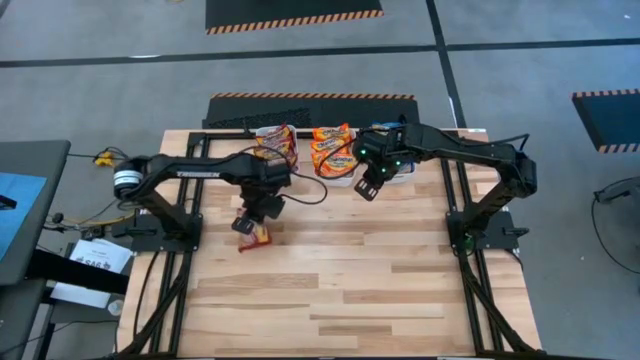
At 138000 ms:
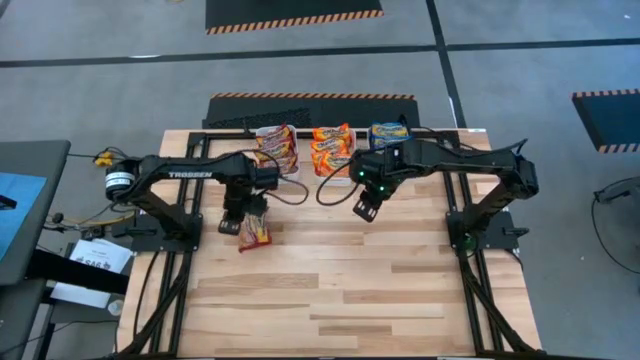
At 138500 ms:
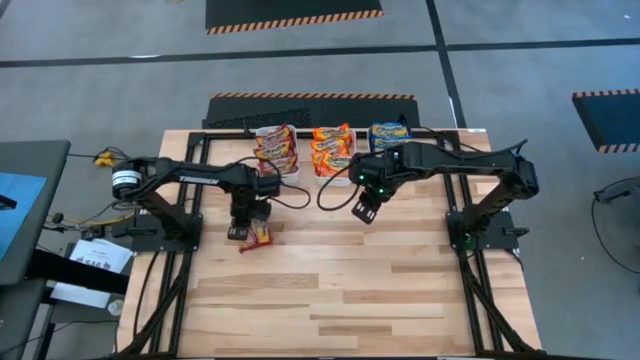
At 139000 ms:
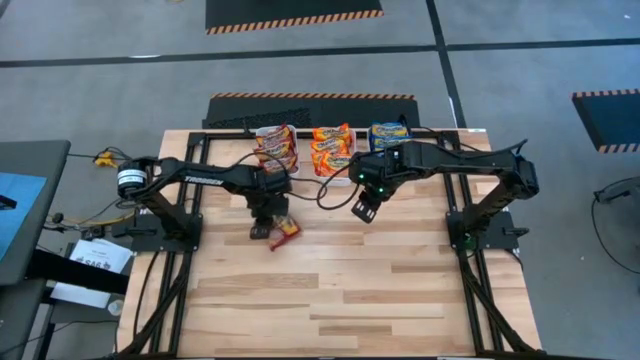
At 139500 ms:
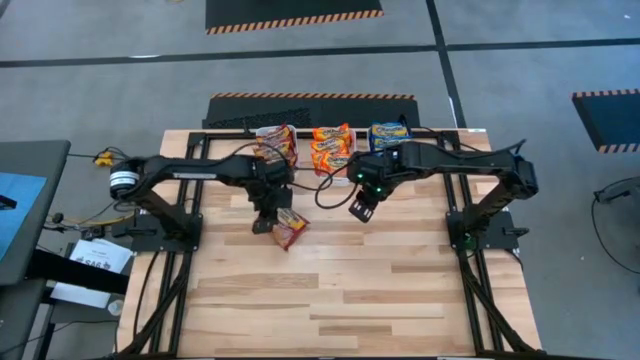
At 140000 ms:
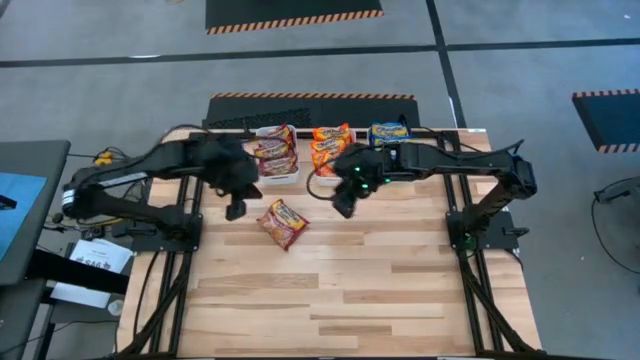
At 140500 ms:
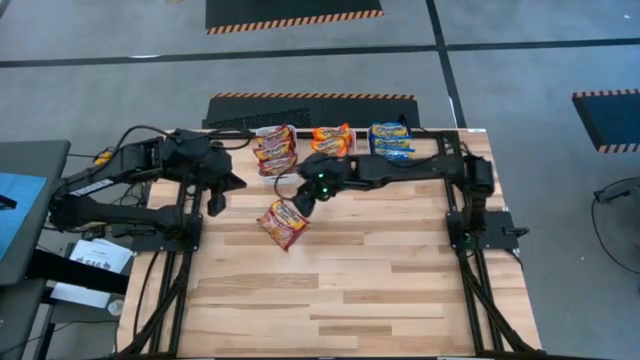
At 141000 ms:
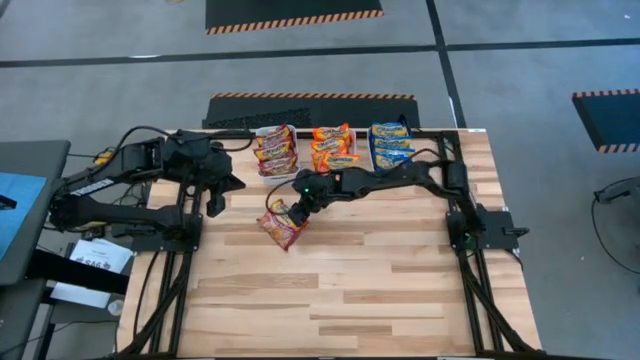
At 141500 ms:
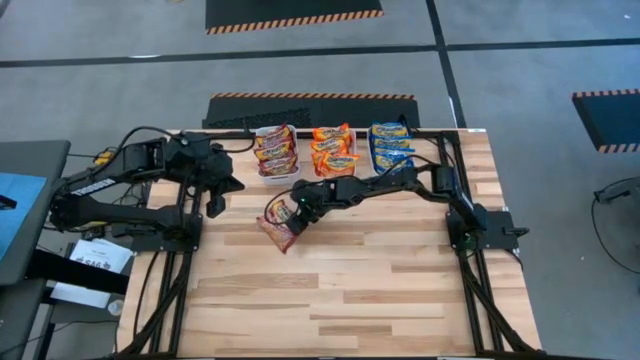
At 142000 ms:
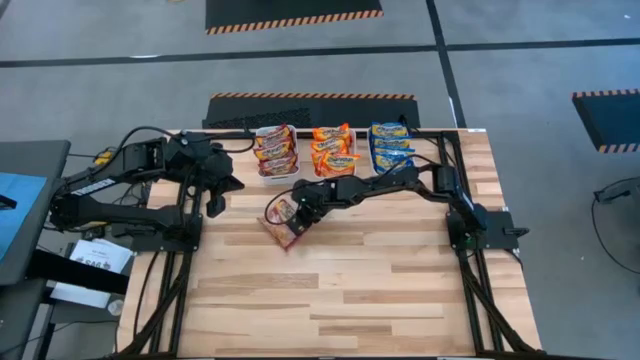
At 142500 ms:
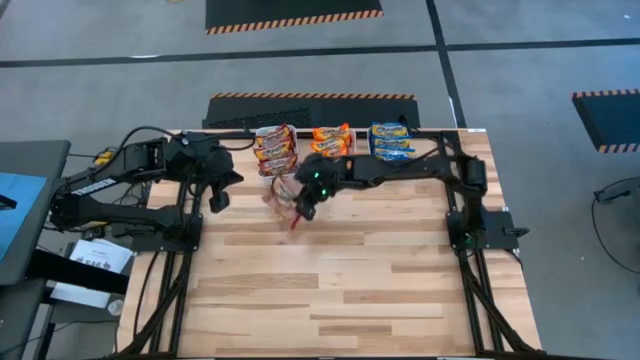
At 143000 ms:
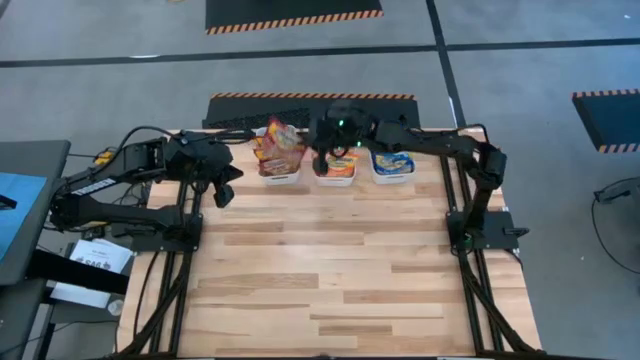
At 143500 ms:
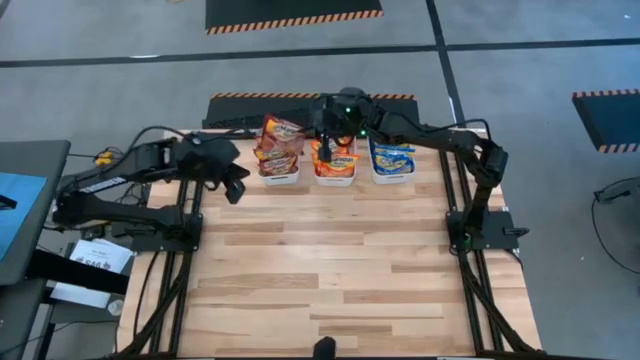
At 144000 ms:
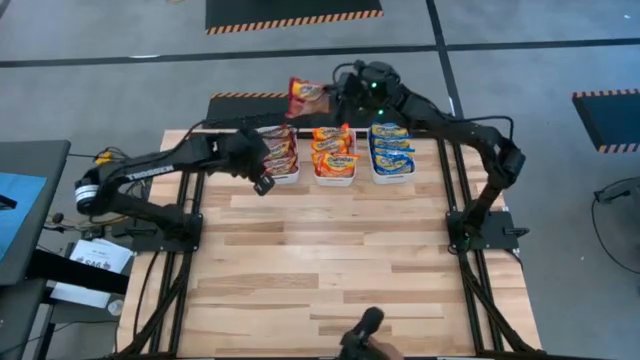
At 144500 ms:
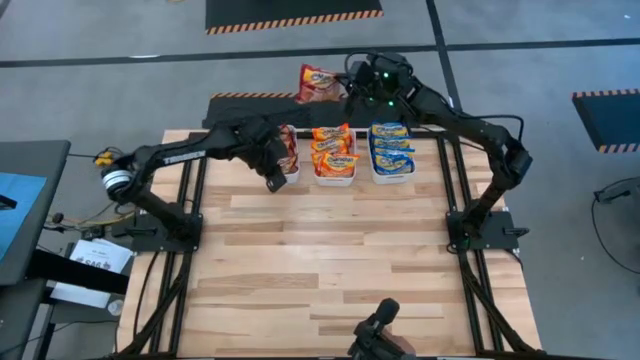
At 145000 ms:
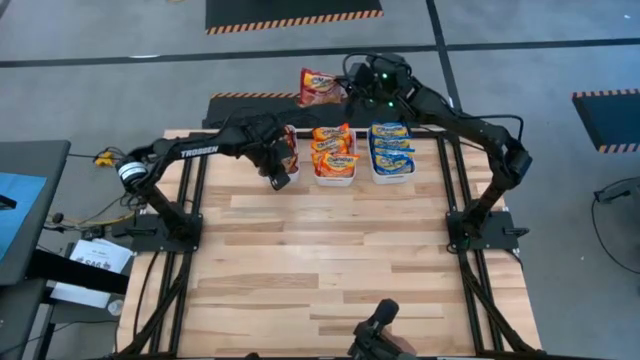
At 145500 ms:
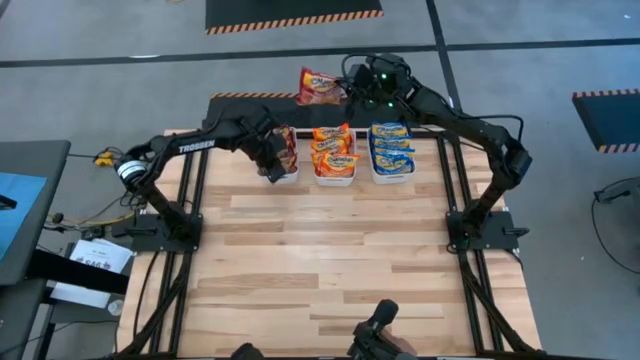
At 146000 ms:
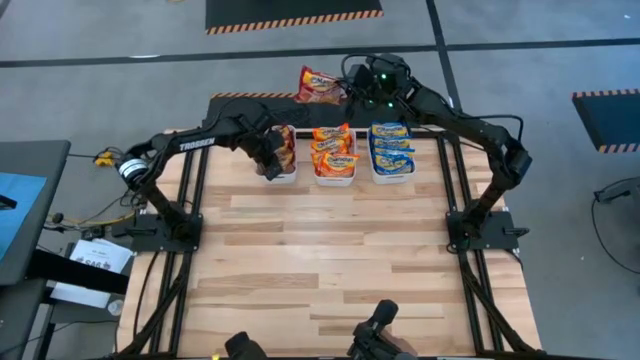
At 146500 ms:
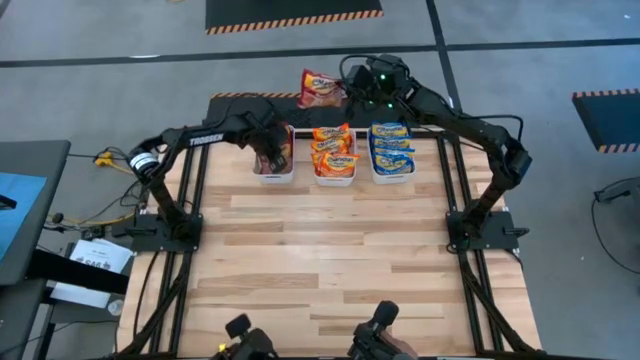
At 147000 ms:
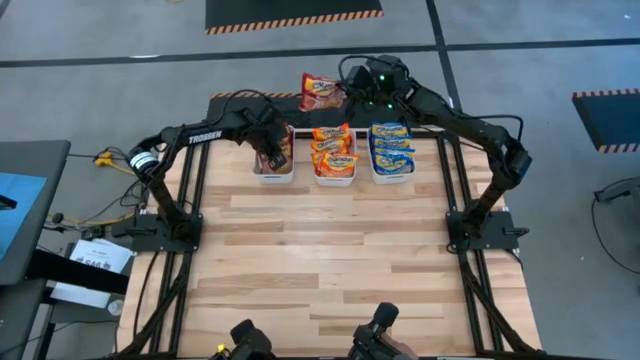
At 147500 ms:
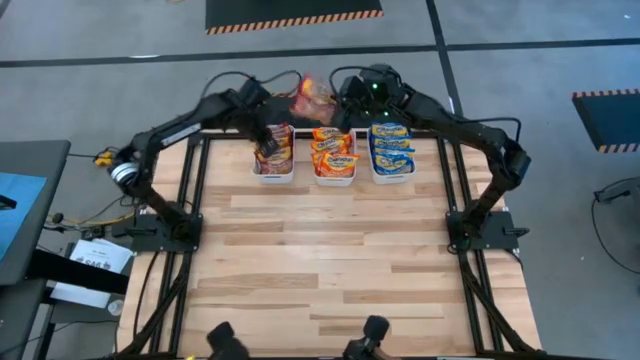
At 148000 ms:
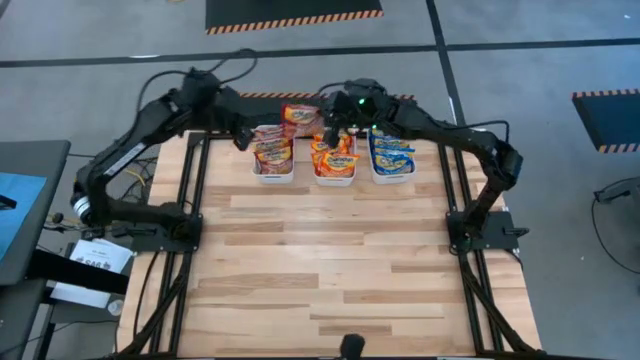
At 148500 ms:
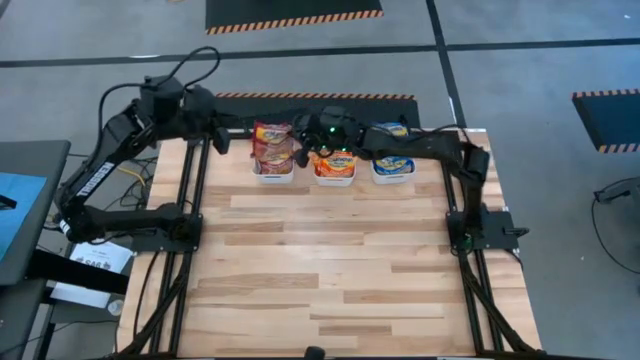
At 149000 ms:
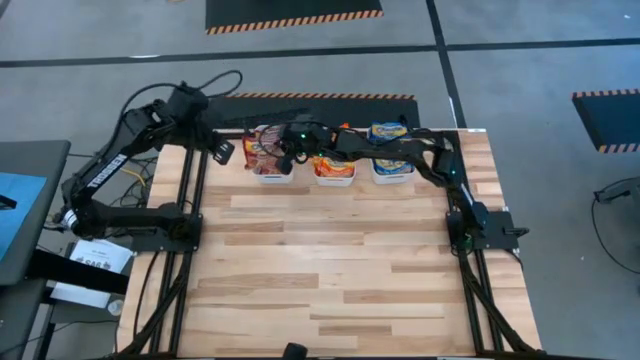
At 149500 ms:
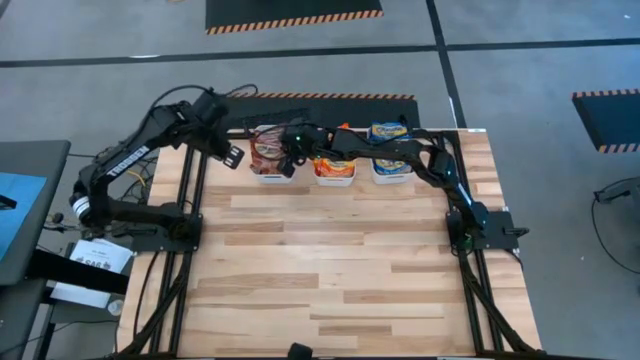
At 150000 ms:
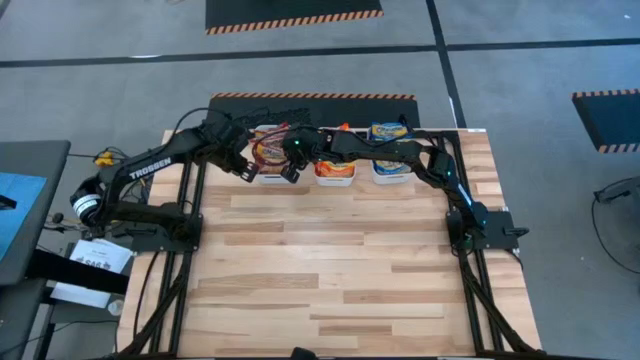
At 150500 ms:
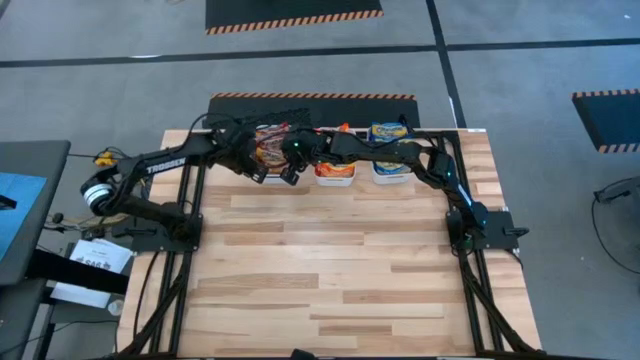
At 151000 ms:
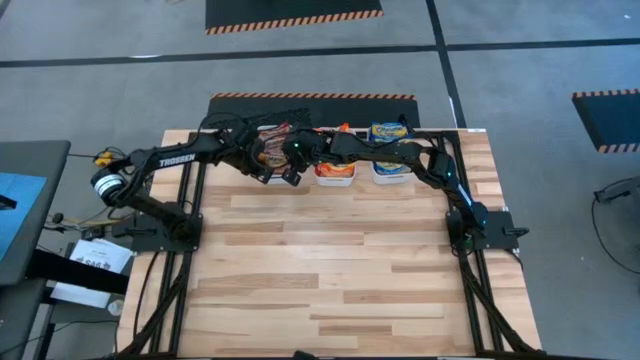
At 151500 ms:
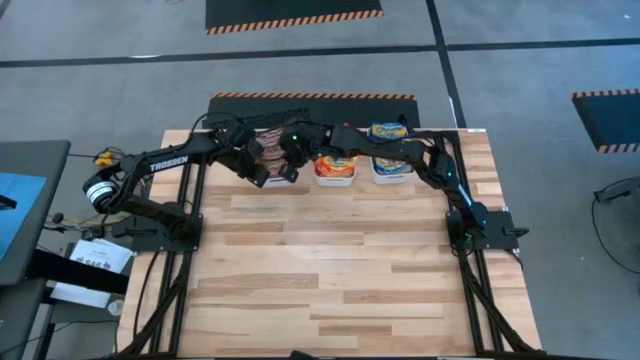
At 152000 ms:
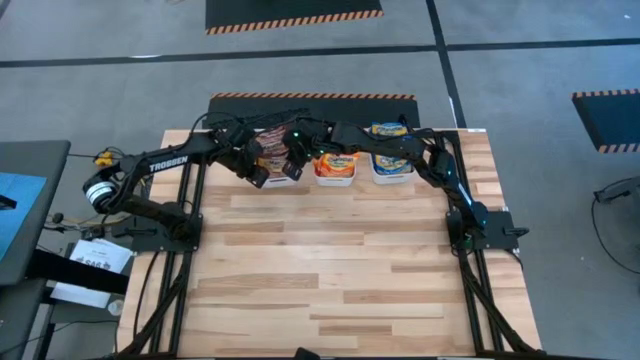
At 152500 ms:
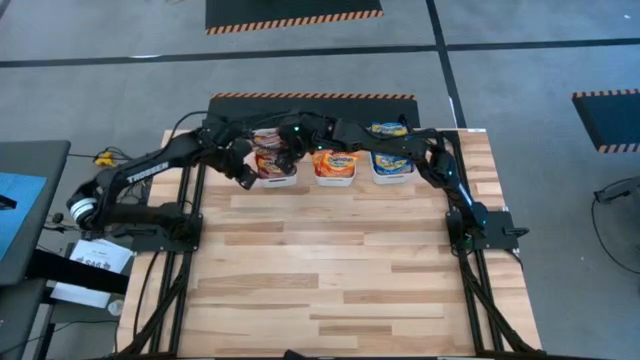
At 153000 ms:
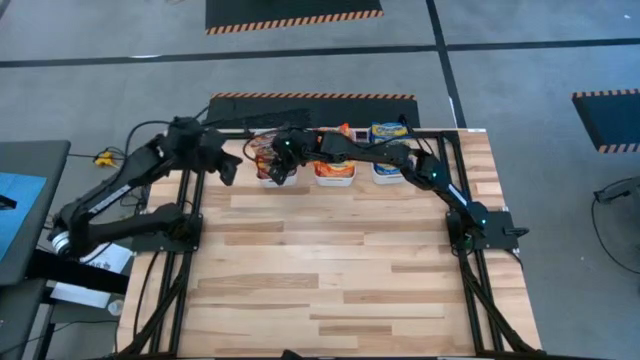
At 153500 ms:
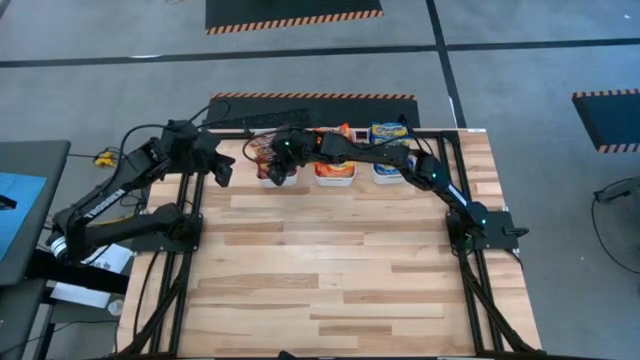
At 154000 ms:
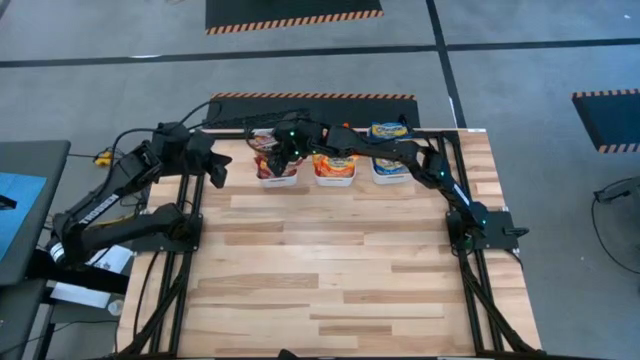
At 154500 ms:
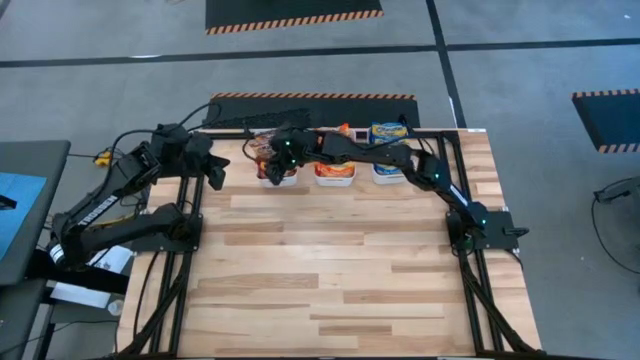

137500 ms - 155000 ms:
Task: Sort Maruchan noodles
Put the red noodle pack into the left white bin

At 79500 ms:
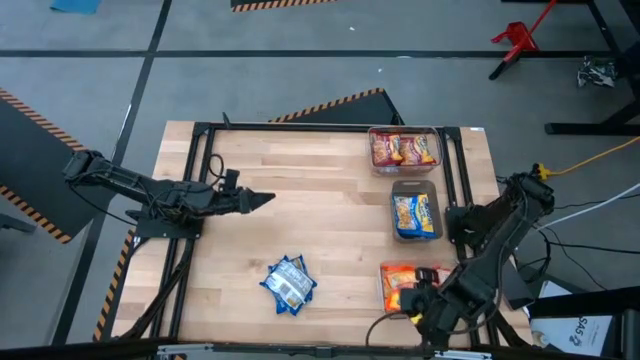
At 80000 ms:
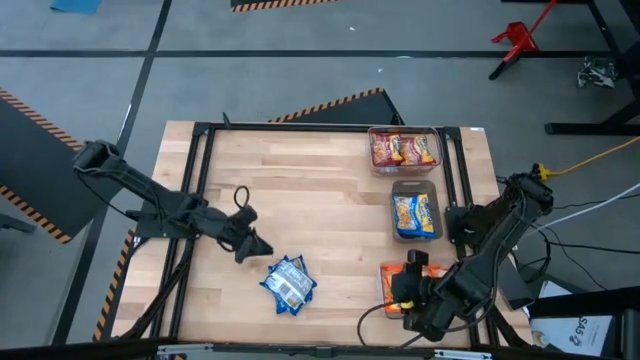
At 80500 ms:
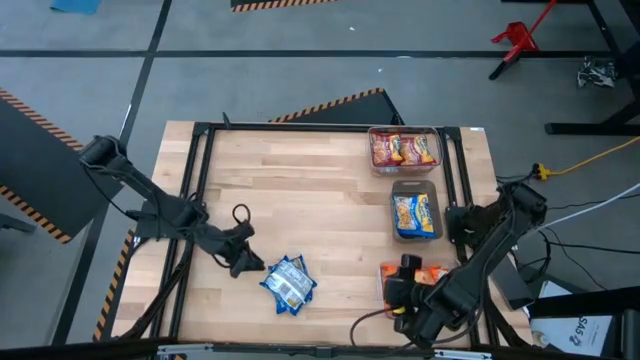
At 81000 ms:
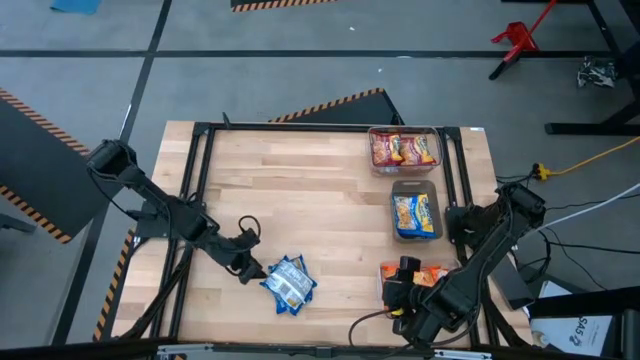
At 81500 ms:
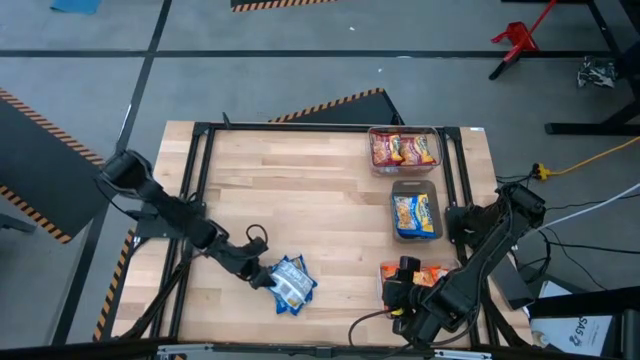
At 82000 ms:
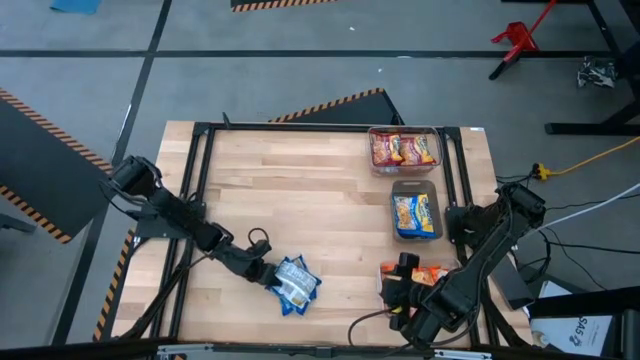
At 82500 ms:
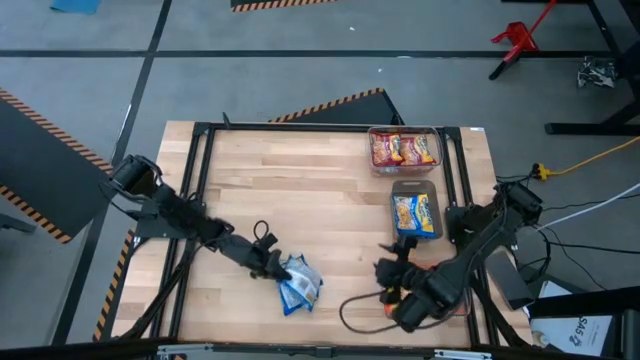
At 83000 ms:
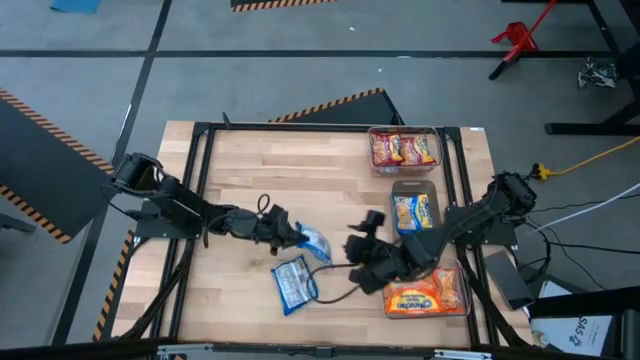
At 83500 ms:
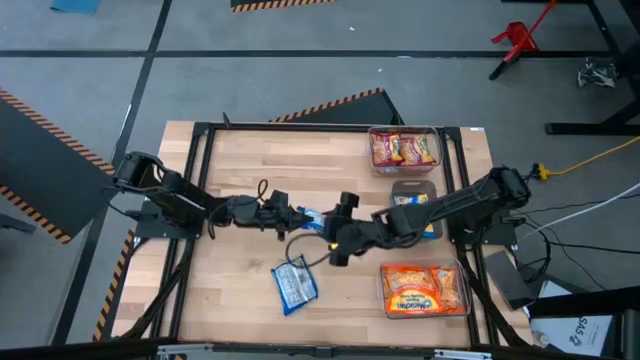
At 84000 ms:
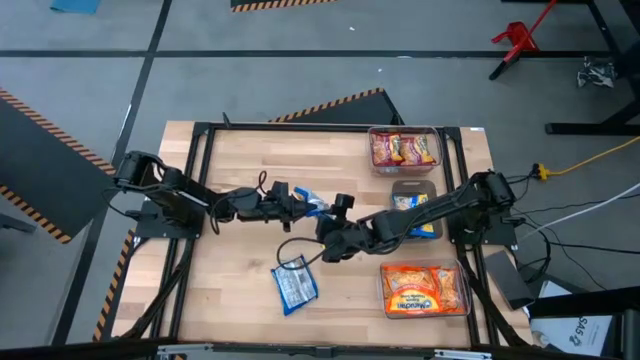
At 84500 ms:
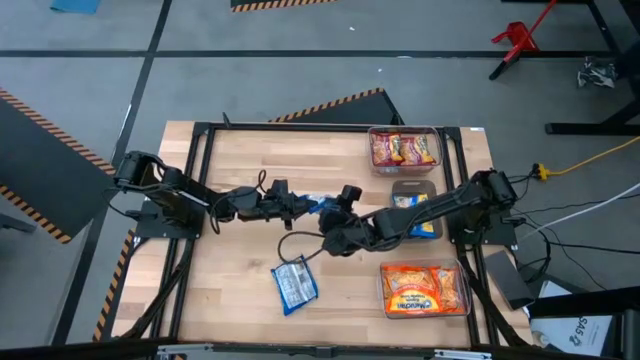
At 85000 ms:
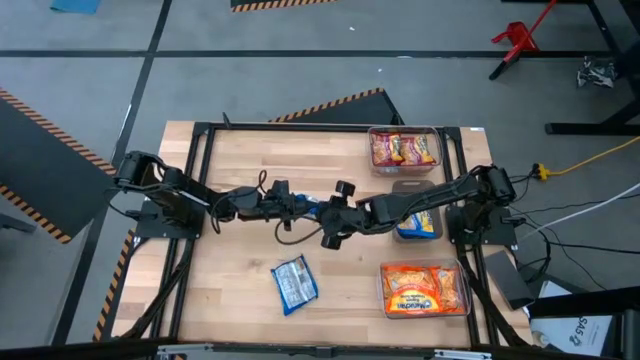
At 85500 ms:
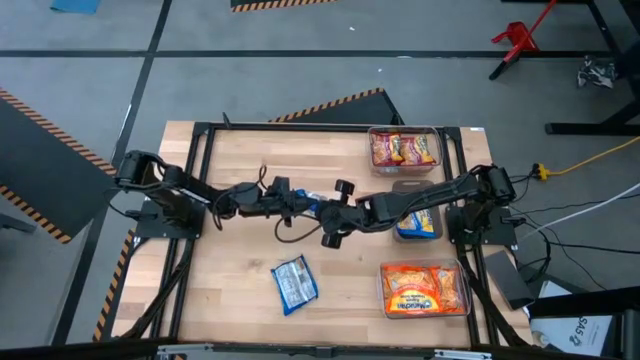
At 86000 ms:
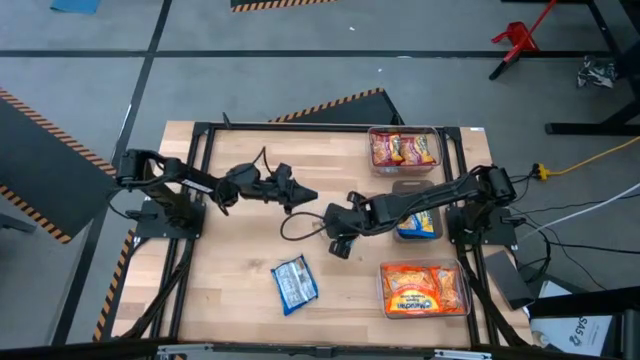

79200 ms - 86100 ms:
Task: Sort Maruchan noodles
Put the blue noodle packs into the black bin
